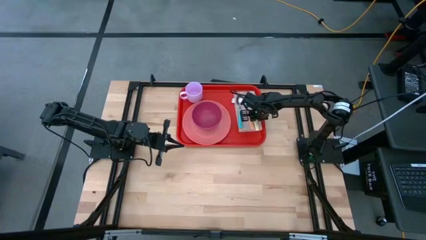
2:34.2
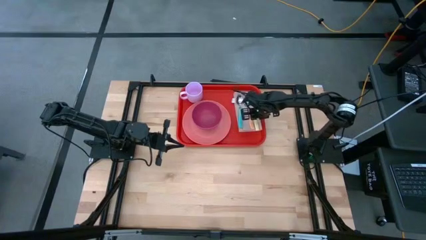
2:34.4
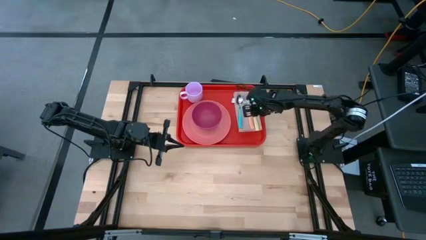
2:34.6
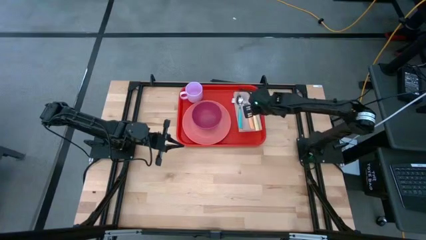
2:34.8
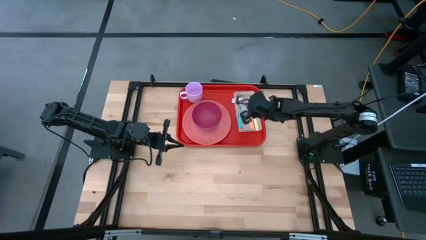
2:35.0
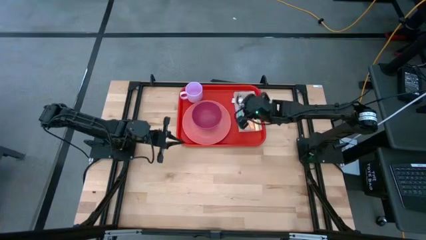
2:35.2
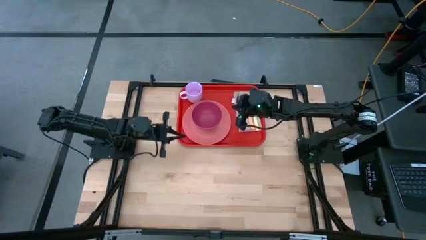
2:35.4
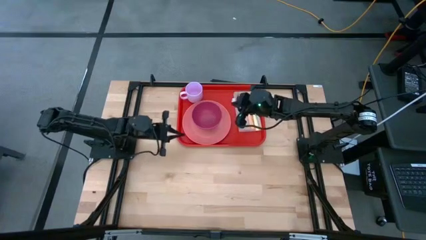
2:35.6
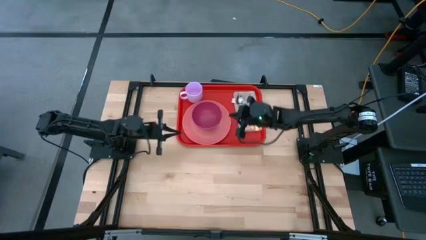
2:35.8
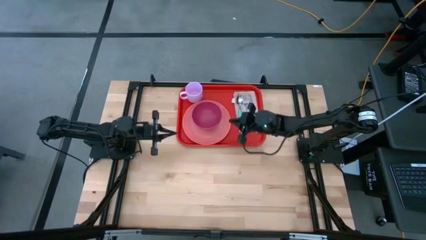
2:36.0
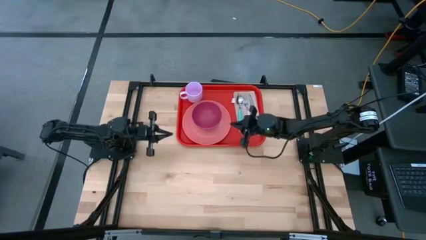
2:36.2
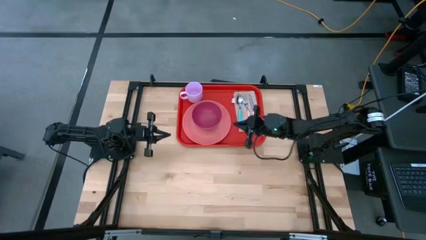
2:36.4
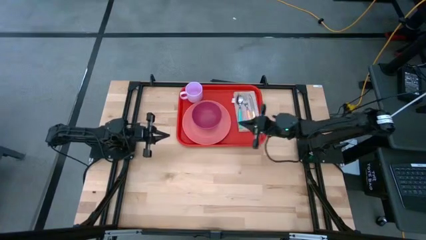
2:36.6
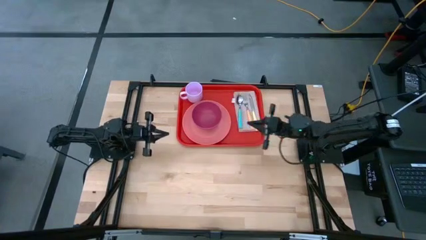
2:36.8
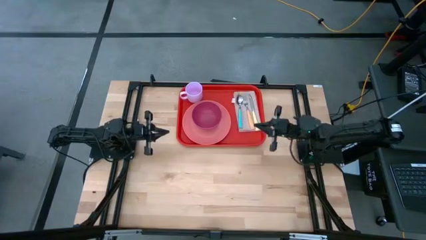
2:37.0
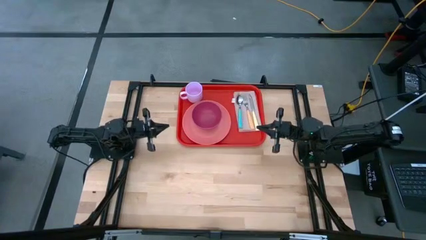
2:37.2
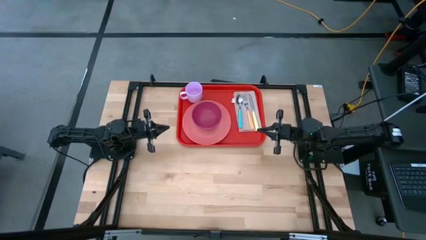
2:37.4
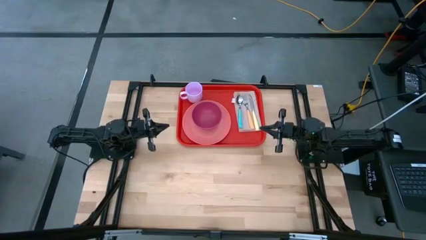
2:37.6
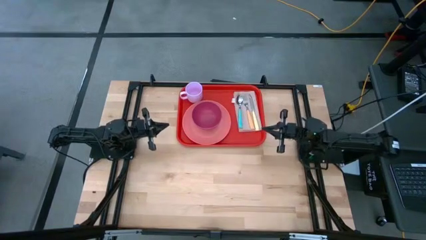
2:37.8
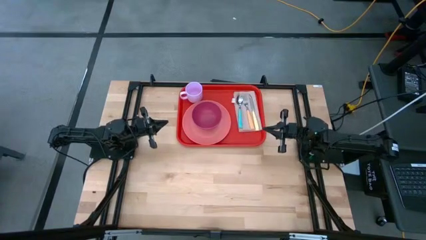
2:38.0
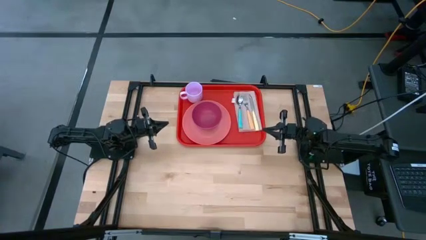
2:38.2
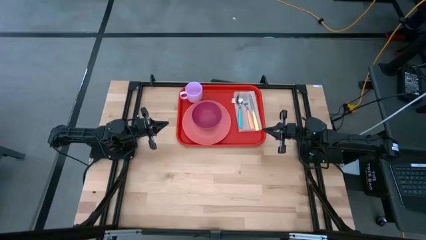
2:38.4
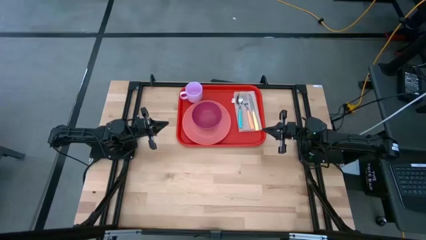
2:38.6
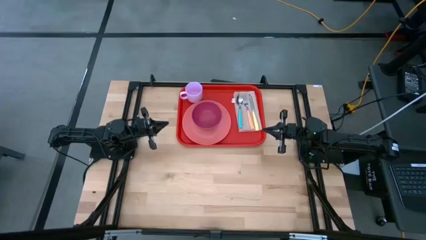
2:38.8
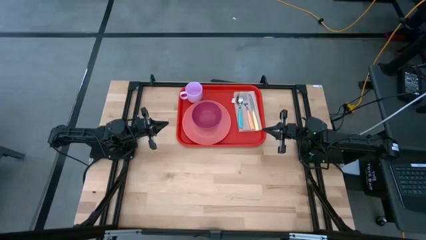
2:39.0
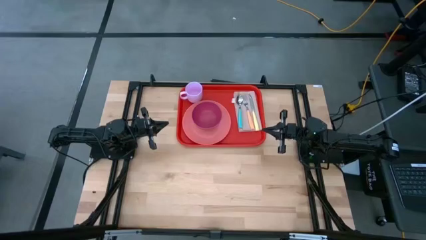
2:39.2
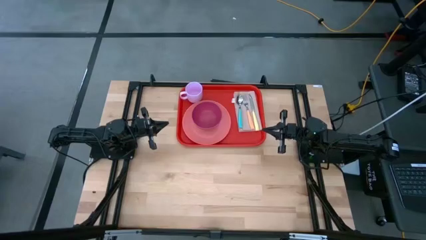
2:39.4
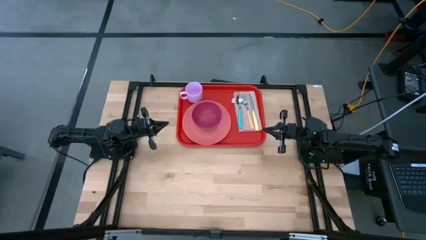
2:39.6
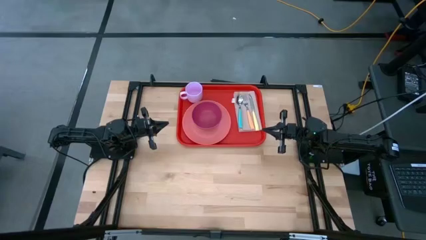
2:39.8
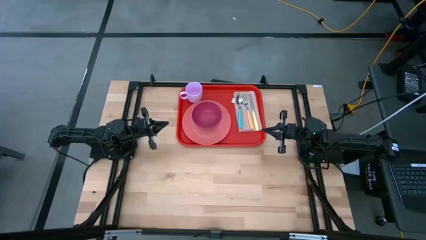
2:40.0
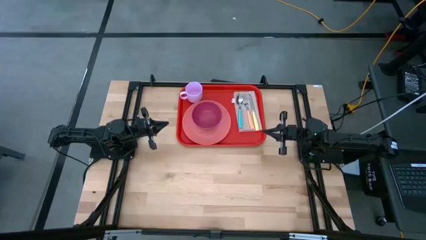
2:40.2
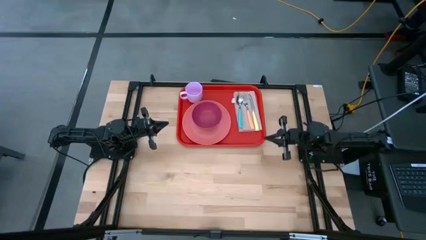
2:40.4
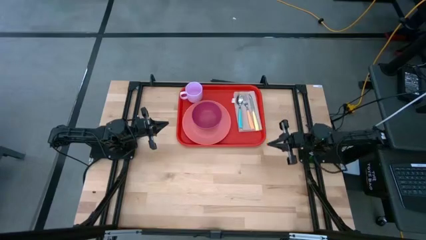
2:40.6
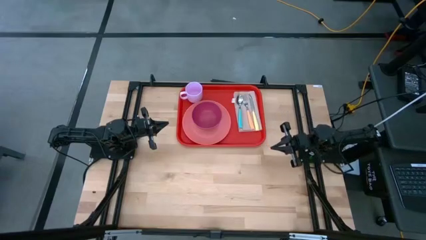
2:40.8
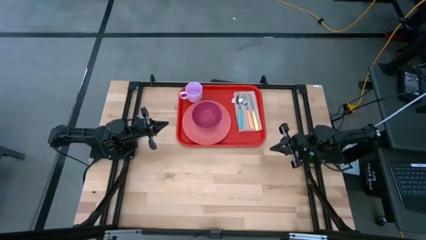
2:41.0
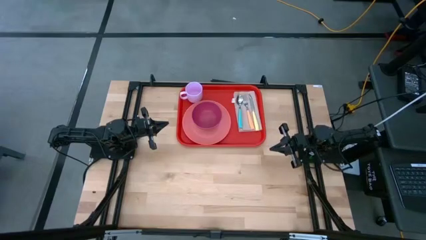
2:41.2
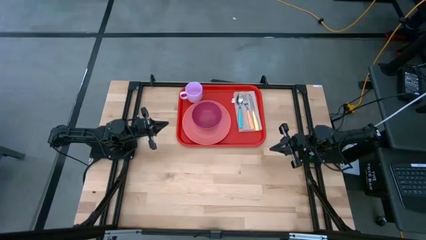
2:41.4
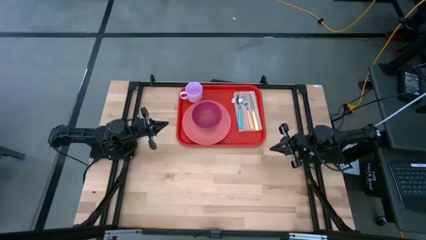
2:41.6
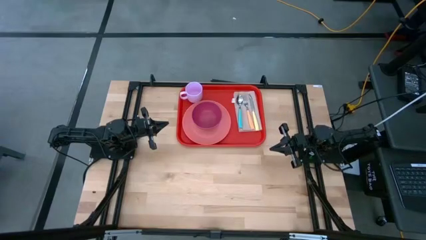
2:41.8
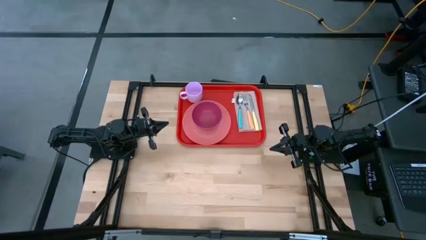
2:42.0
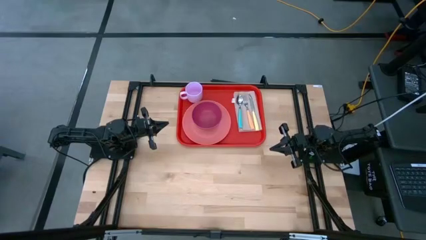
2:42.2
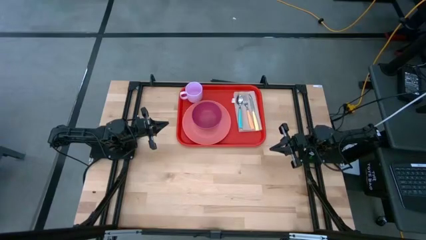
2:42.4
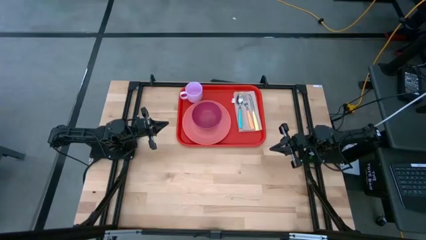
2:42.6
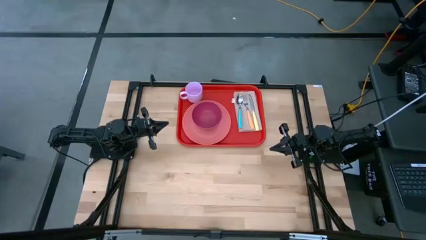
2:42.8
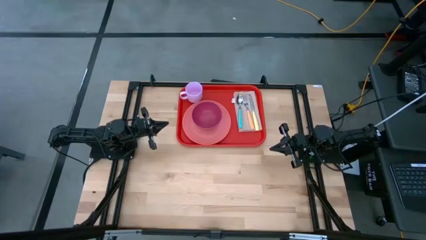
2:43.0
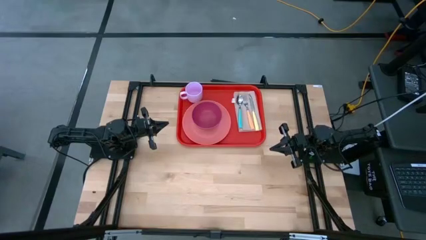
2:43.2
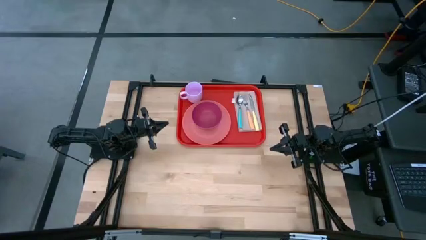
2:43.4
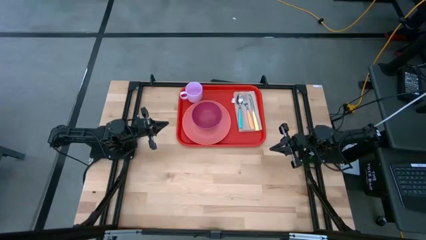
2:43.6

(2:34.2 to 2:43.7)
Task: Set up tray
Return to Home Position
